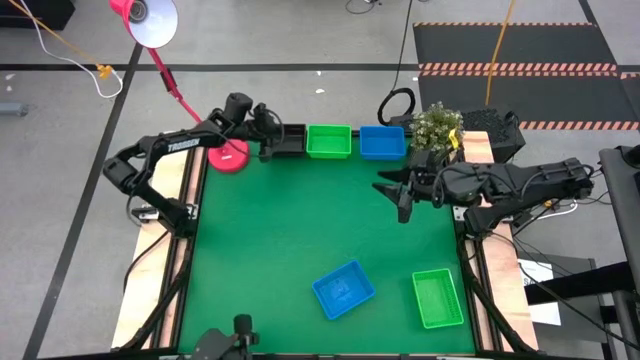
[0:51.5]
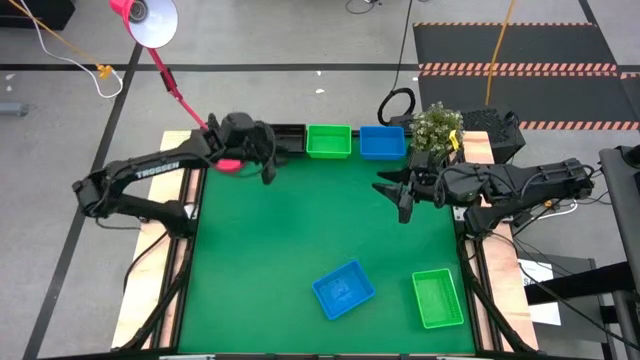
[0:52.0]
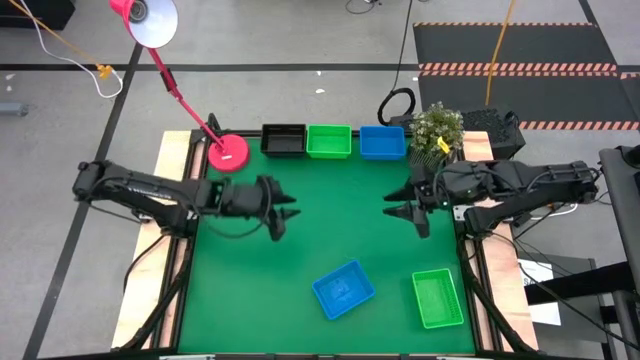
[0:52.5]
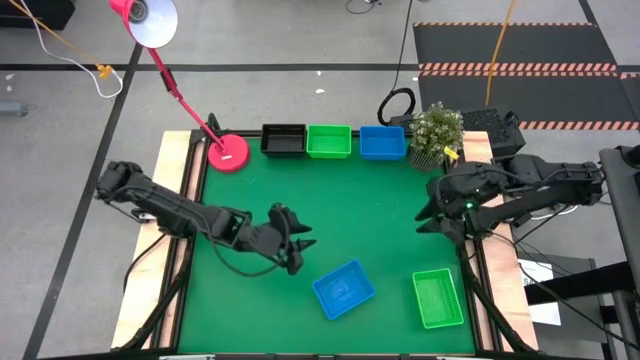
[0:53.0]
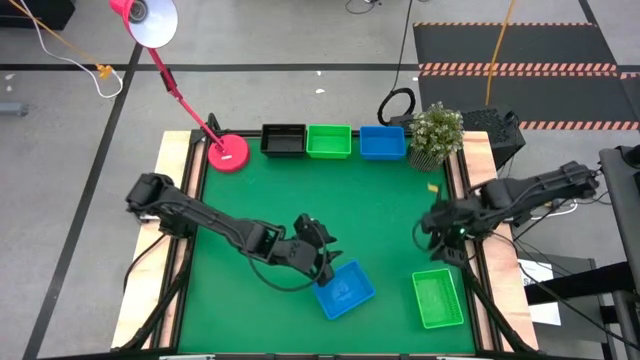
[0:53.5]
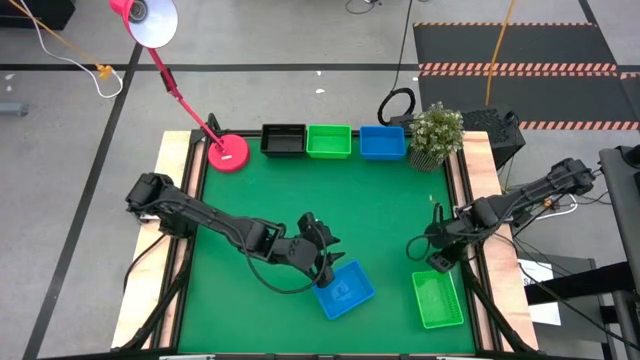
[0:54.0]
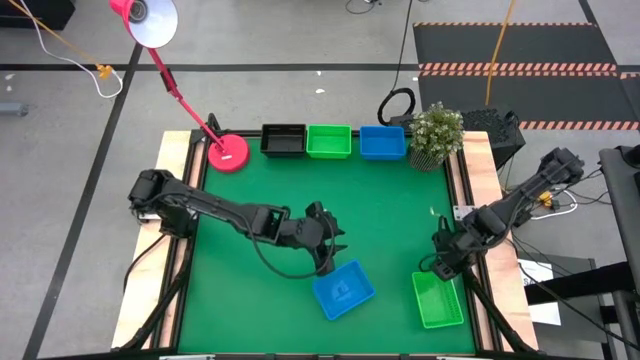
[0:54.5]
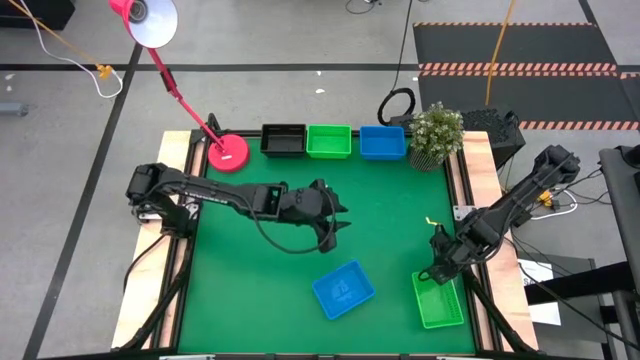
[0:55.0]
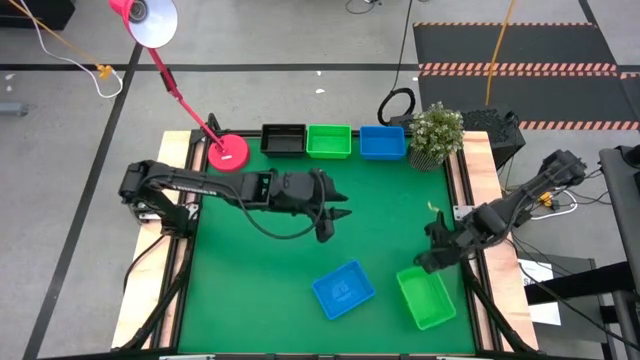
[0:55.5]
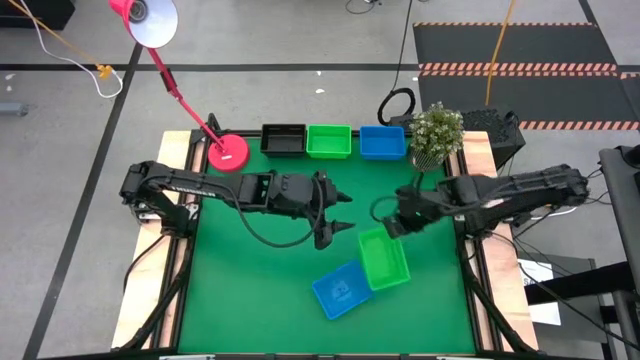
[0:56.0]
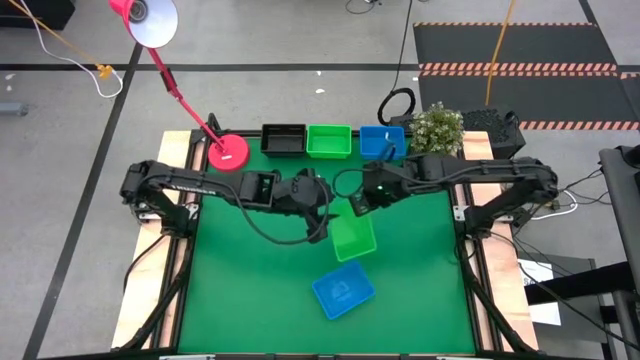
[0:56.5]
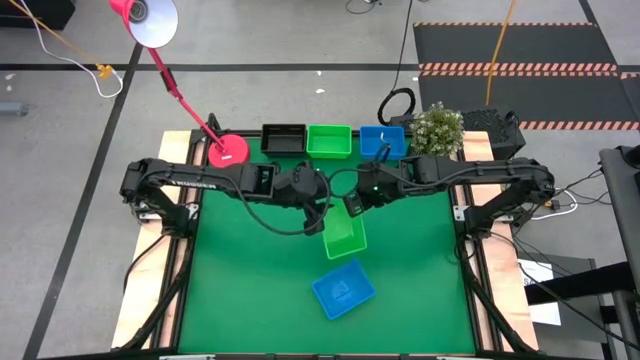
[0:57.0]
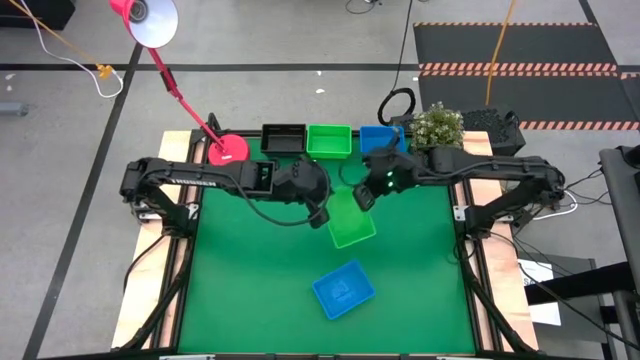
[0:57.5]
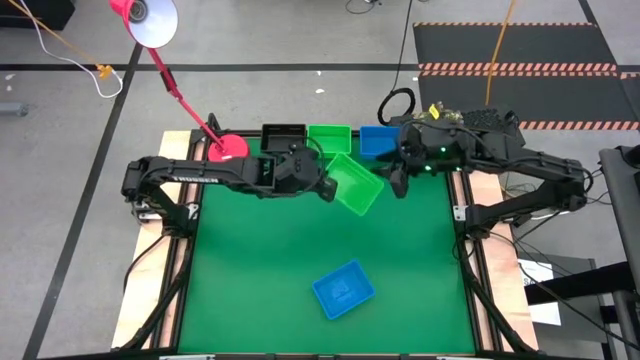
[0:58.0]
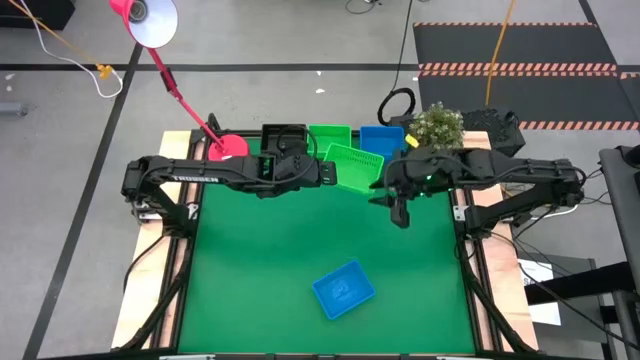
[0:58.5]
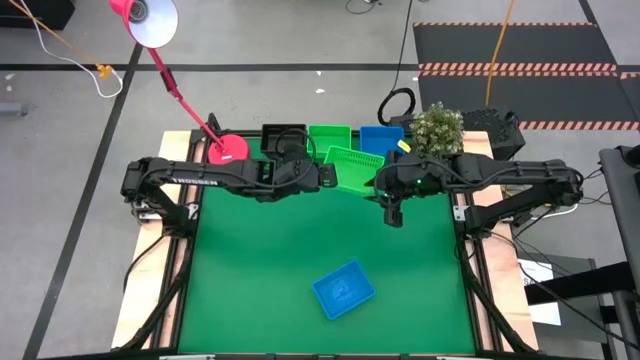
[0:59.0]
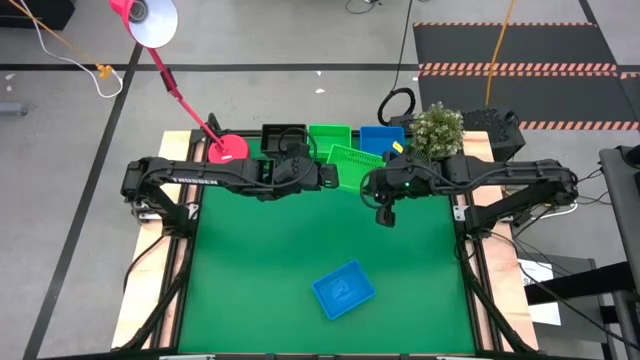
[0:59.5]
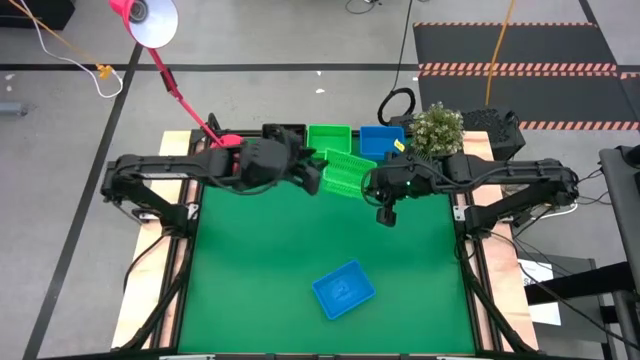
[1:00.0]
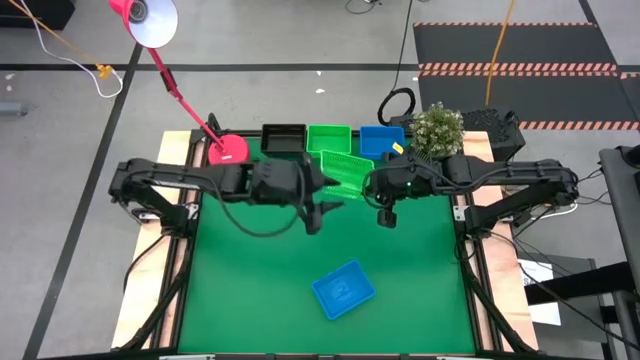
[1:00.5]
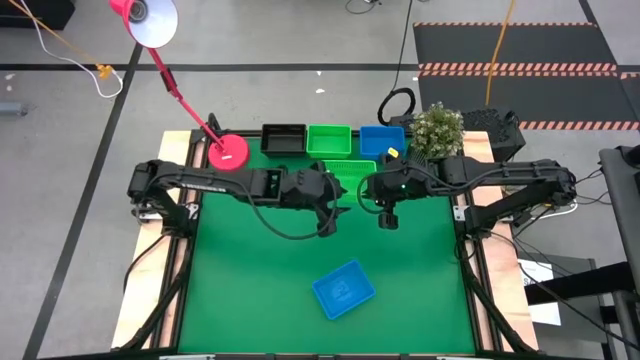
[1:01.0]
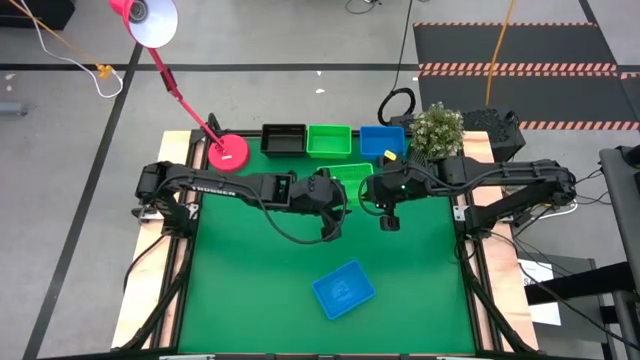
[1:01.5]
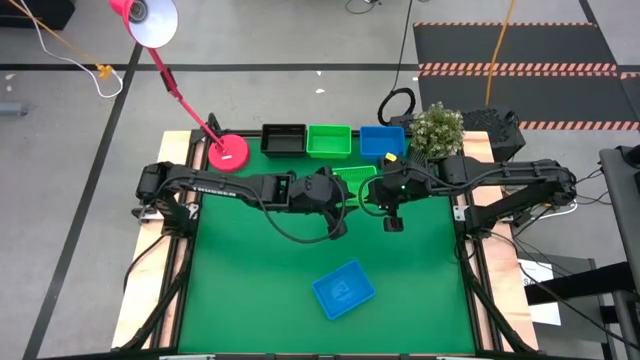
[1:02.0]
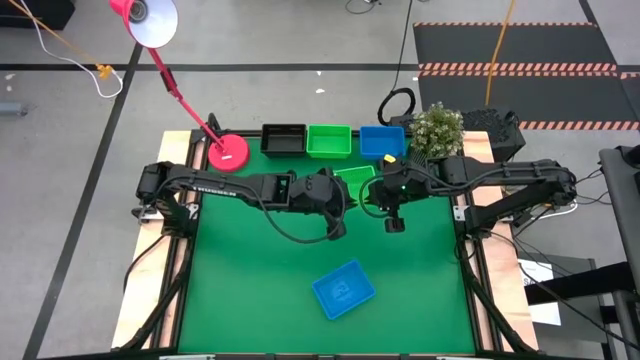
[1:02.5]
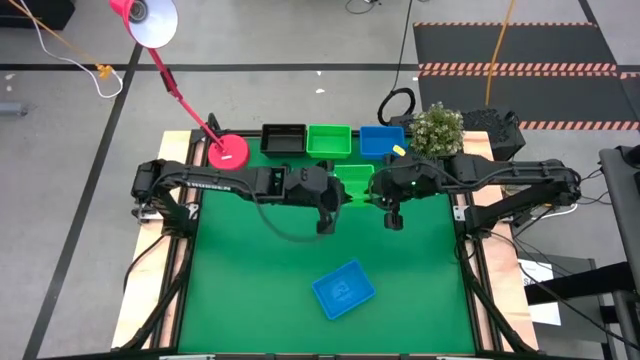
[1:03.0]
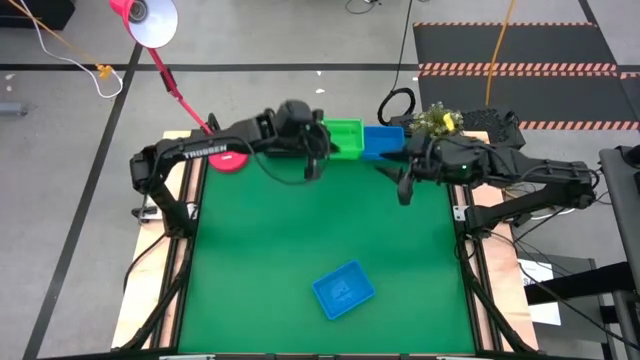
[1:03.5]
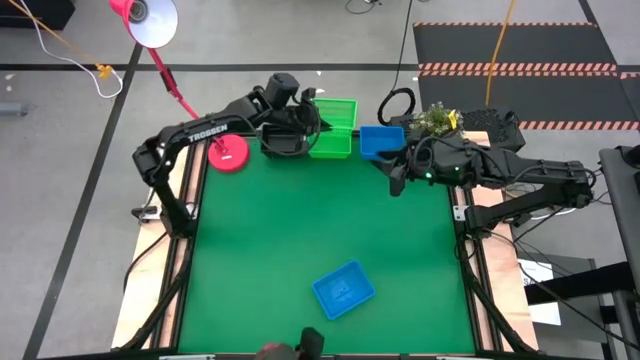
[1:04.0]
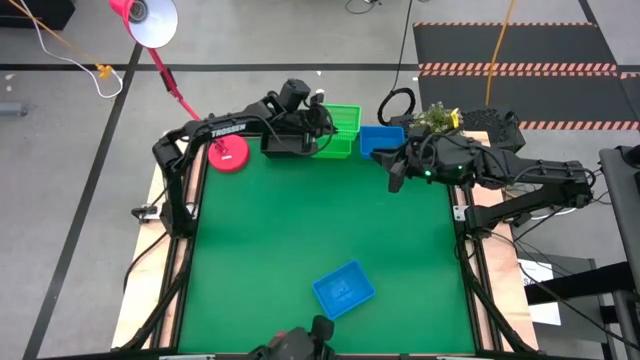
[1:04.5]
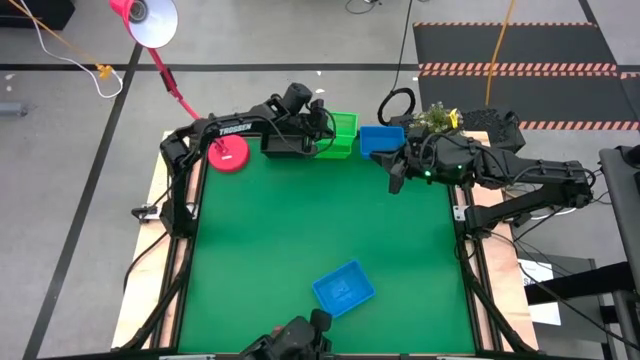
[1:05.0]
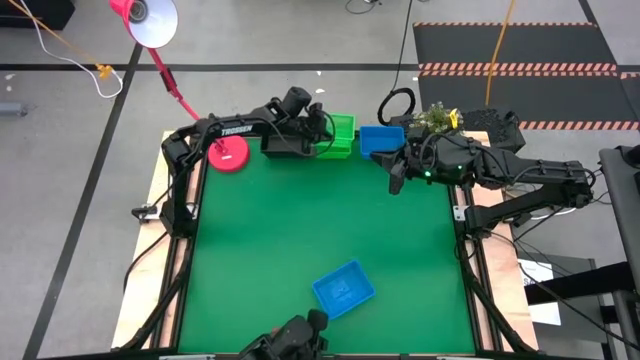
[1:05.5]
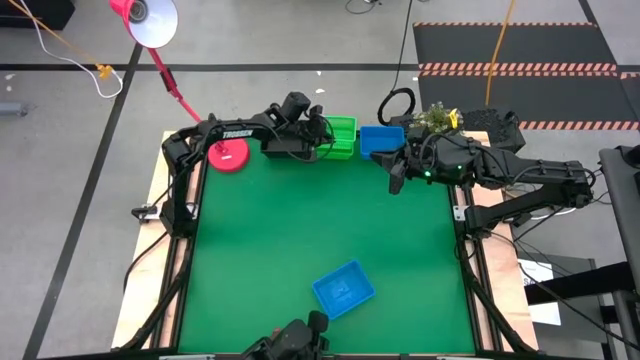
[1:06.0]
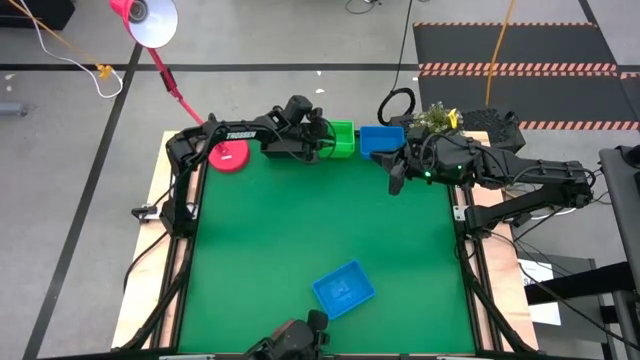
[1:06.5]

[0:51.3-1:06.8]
Stack the right green bin into the top stacked green bin
